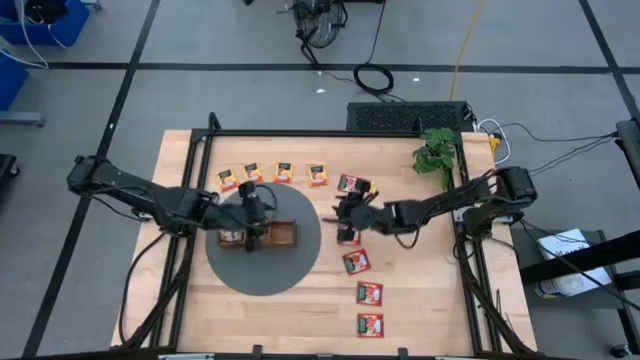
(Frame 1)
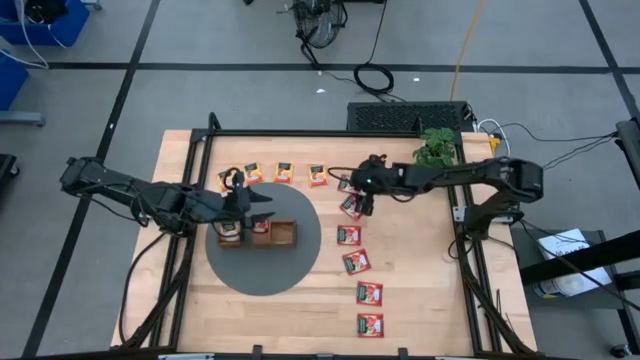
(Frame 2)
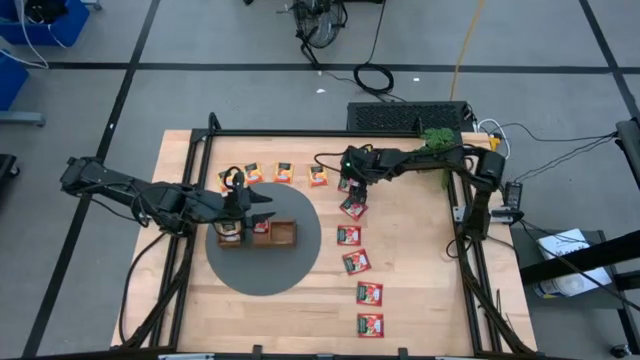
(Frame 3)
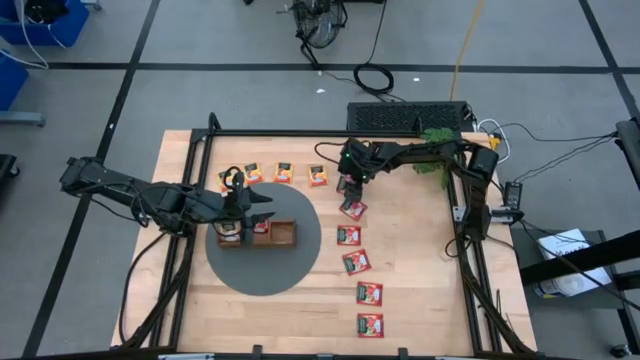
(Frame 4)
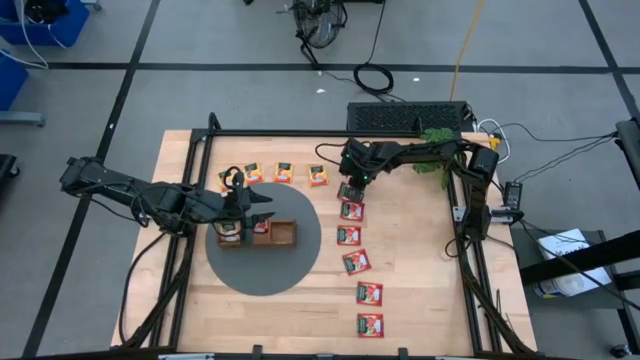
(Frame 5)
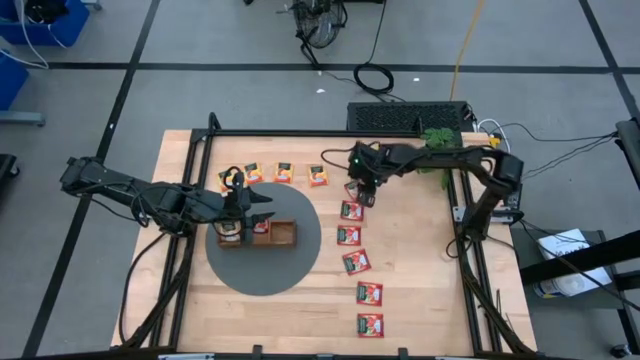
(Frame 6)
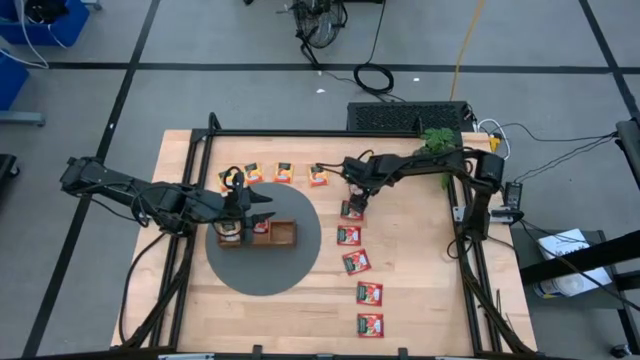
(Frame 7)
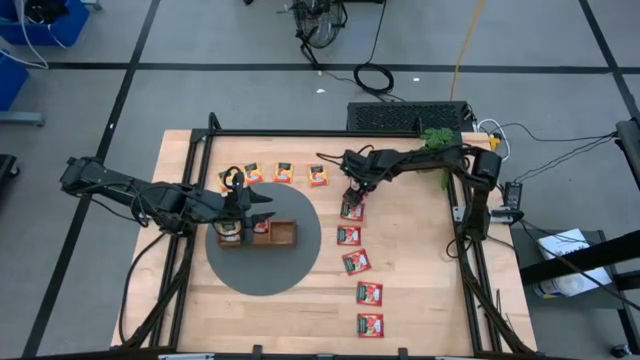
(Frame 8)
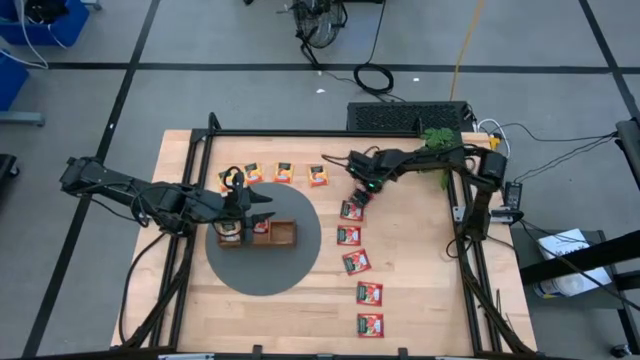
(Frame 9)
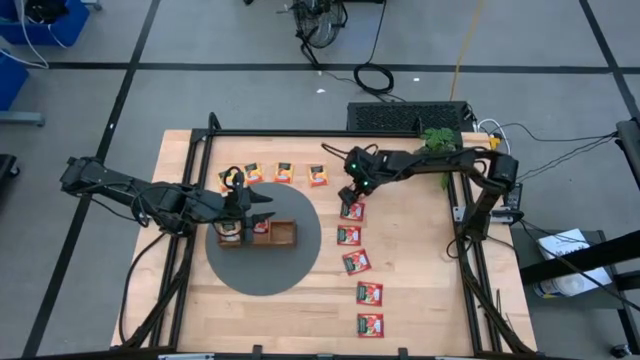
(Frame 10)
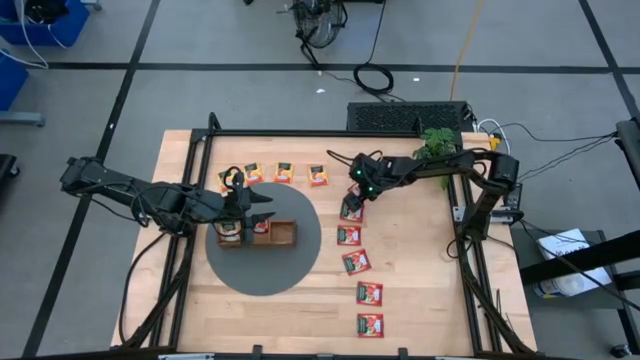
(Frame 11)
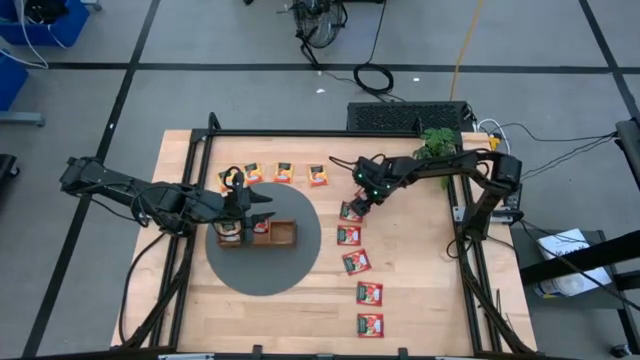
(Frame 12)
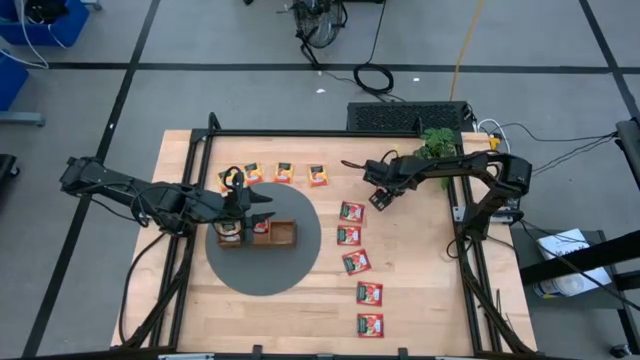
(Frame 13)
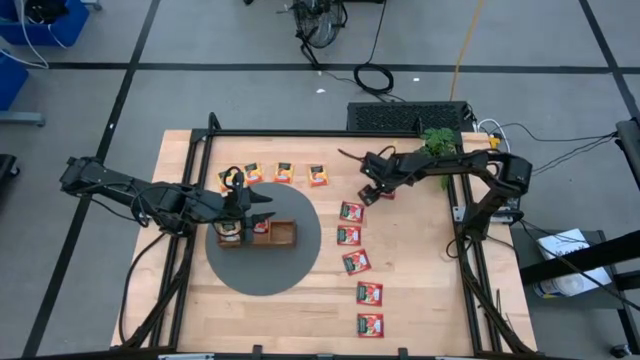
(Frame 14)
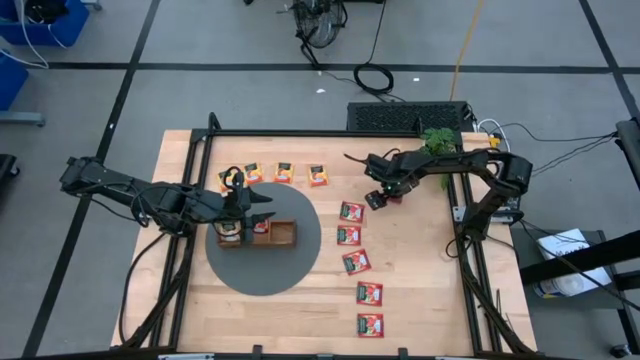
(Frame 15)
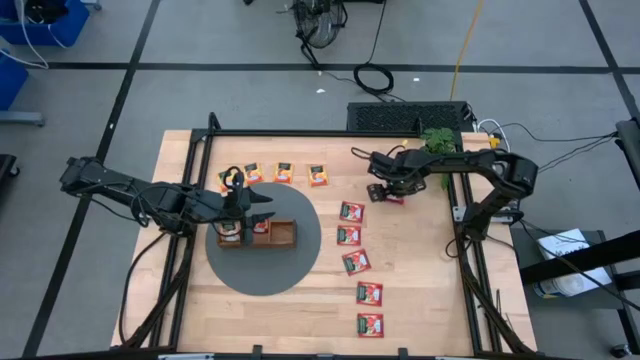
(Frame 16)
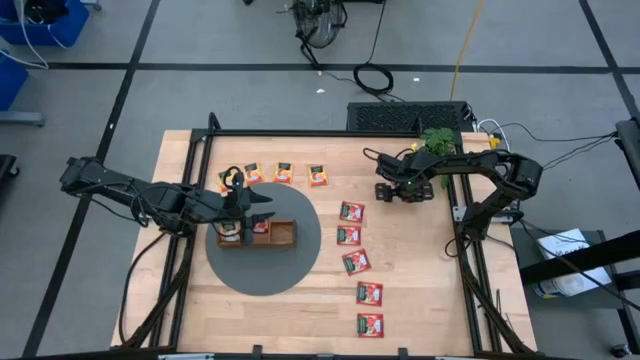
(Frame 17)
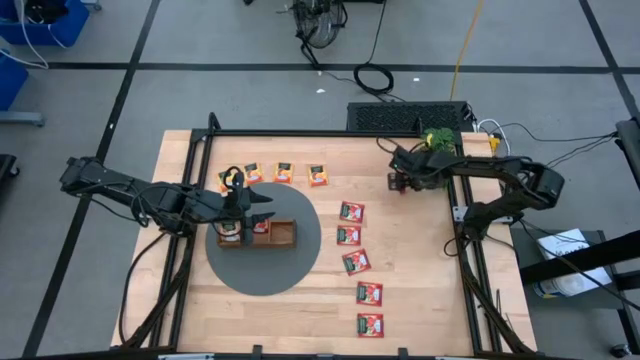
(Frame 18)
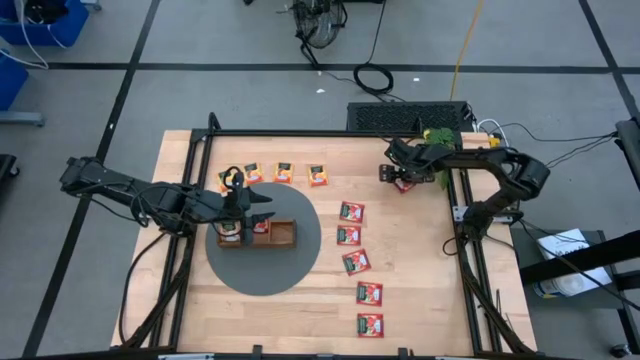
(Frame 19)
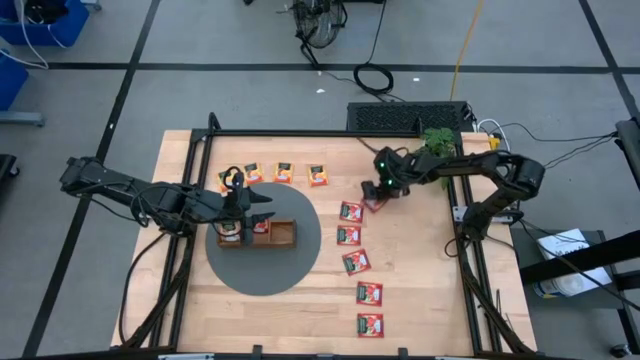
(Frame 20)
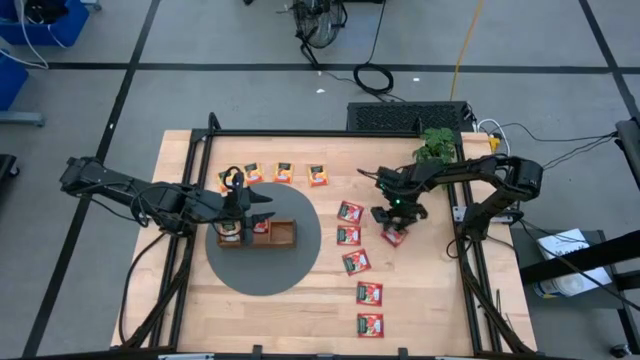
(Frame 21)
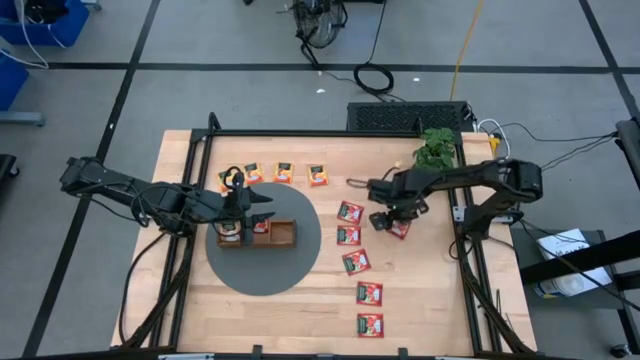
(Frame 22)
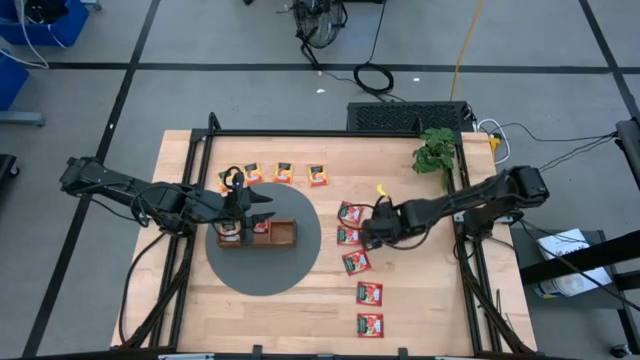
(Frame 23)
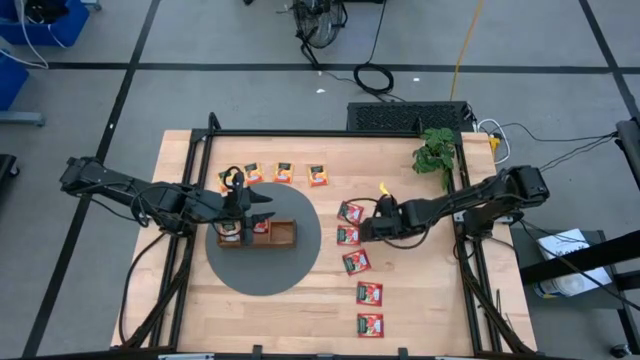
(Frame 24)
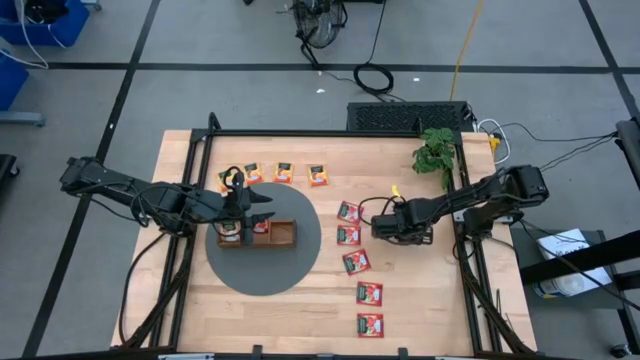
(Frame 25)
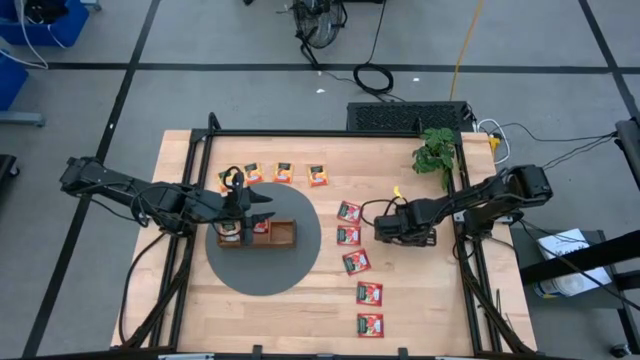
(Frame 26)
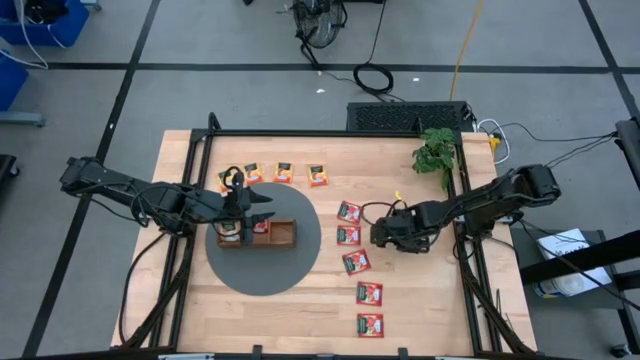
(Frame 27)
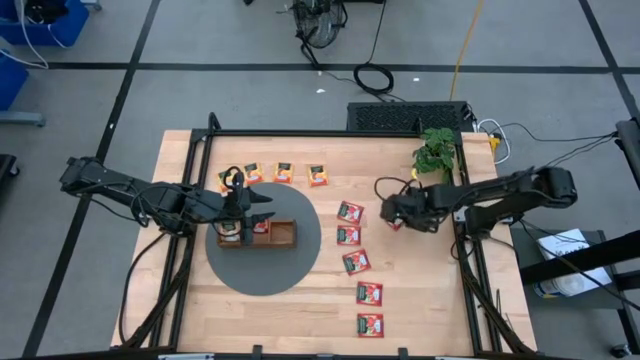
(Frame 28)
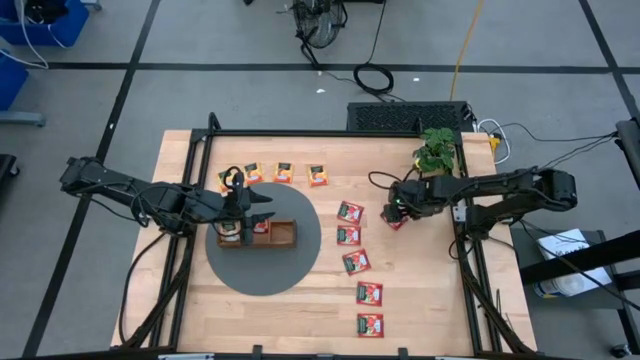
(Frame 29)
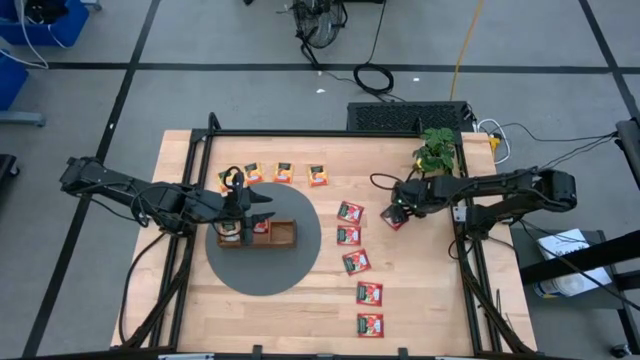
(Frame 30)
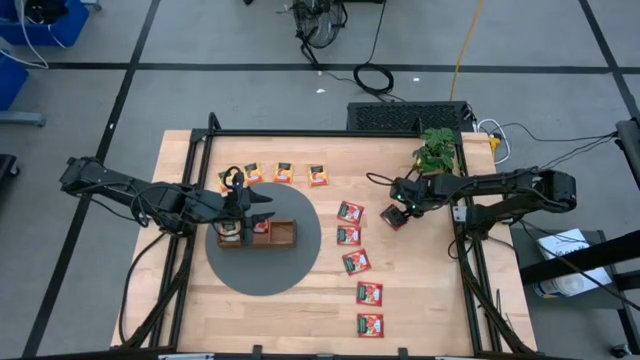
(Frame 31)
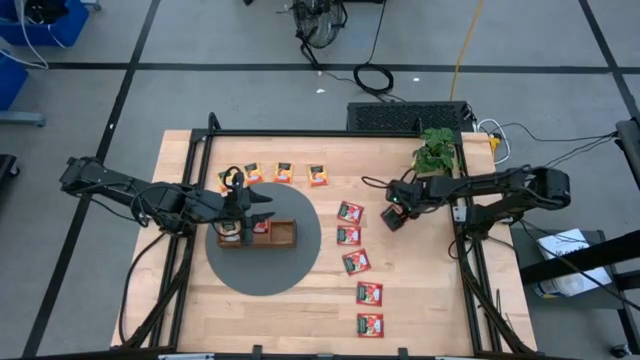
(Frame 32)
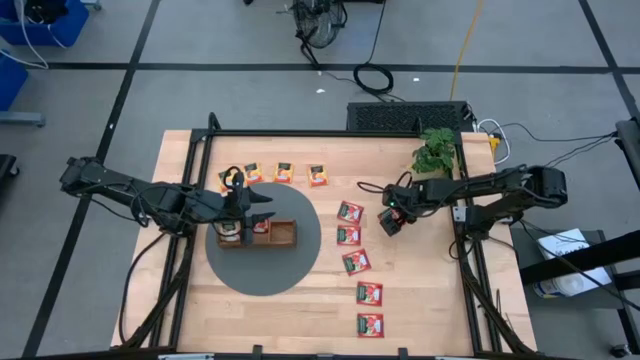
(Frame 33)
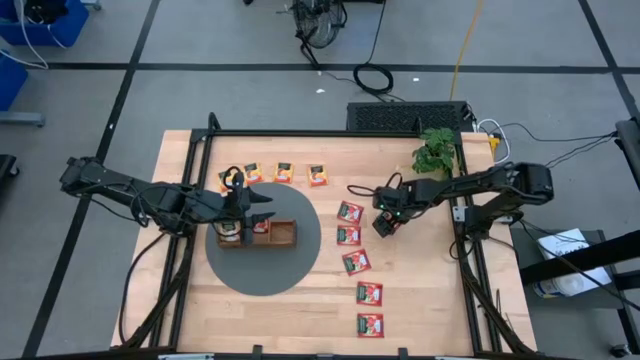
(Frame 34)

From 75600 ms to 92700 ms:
Task: Pick & Place Tea
Put the red tea bag into the middle section of the wooden organizer

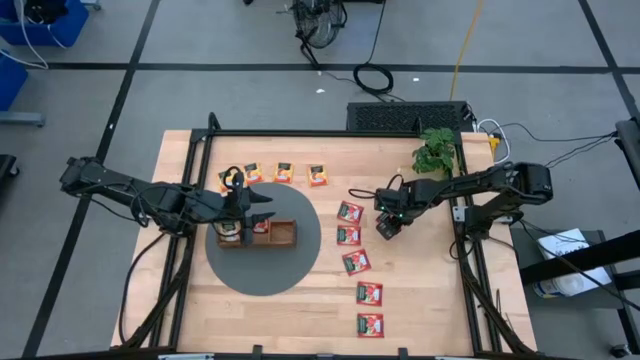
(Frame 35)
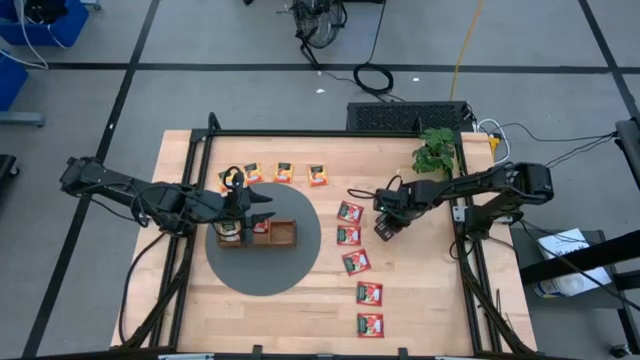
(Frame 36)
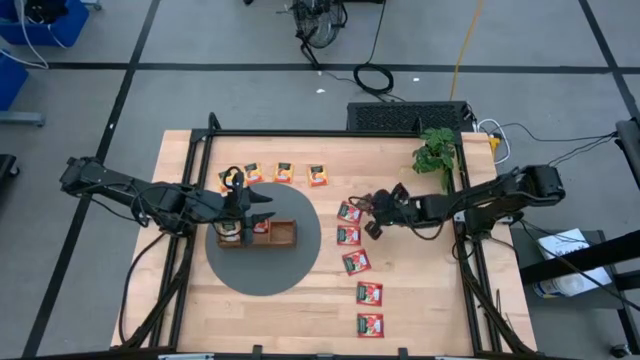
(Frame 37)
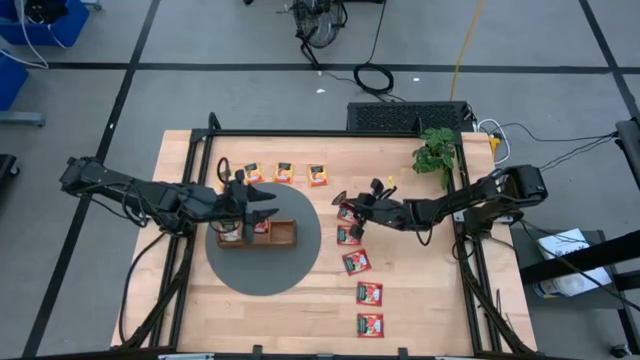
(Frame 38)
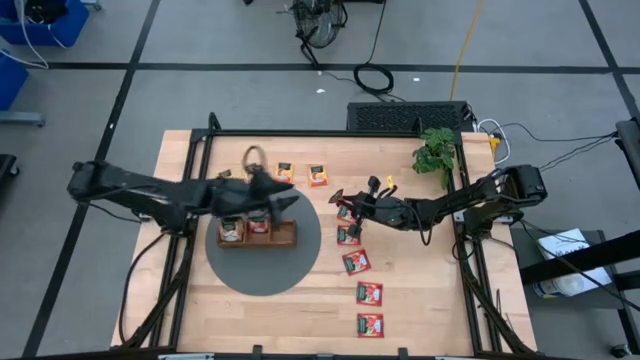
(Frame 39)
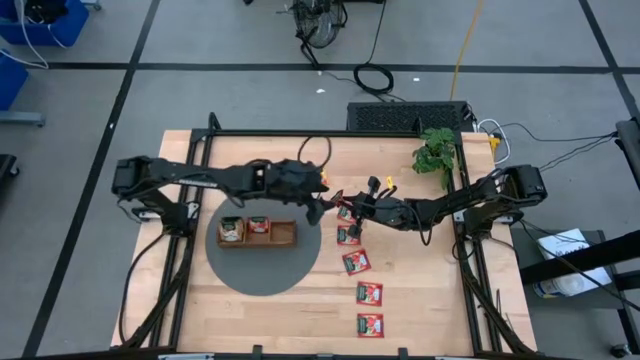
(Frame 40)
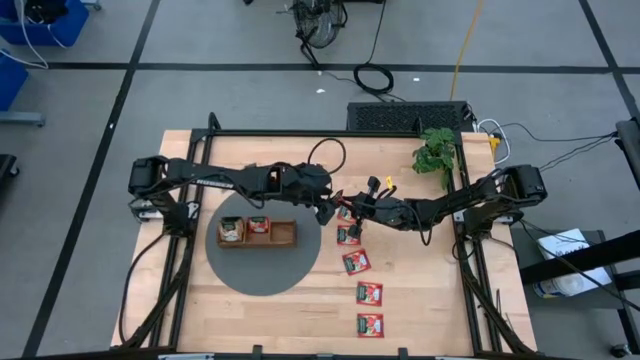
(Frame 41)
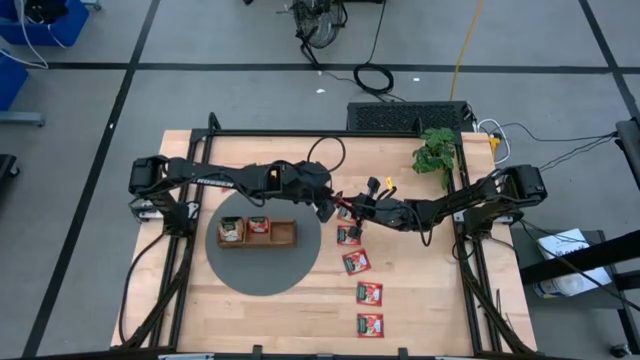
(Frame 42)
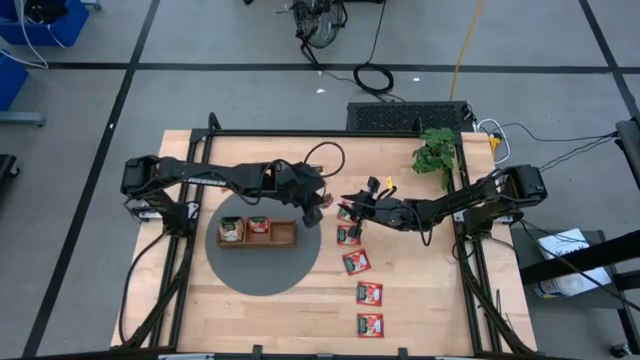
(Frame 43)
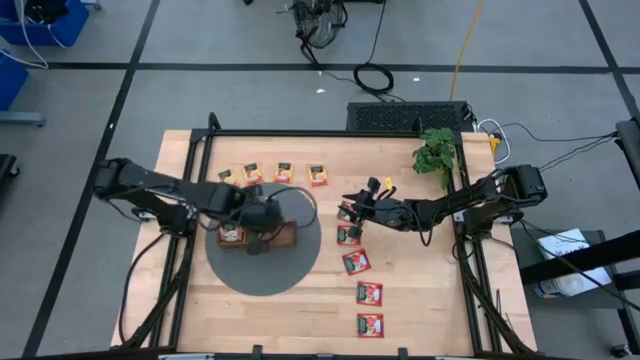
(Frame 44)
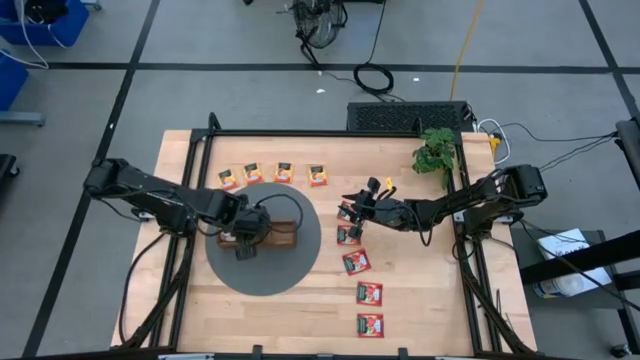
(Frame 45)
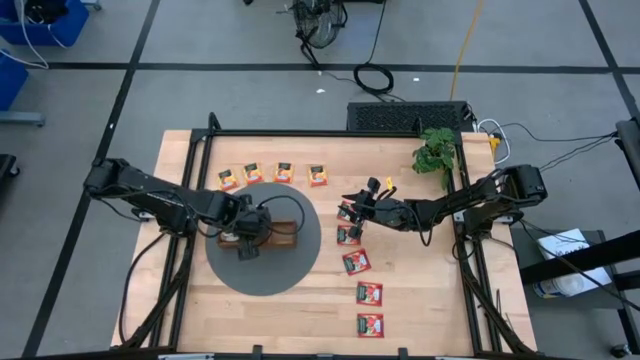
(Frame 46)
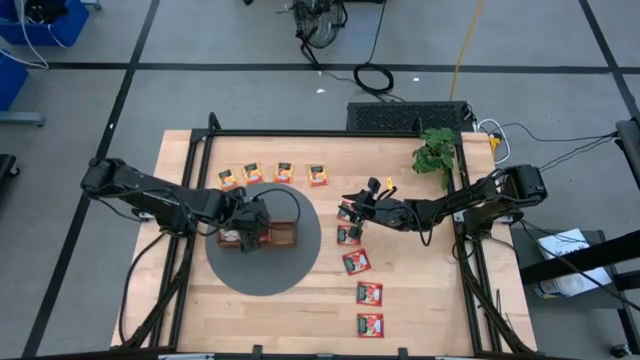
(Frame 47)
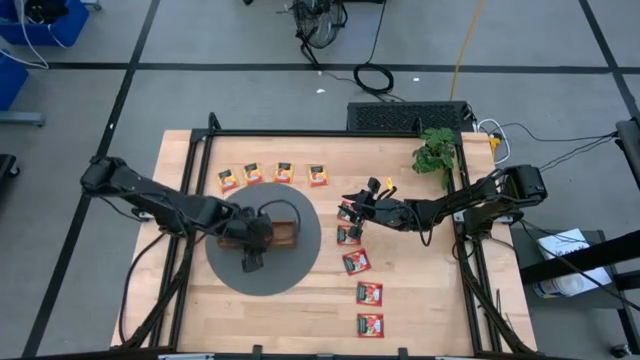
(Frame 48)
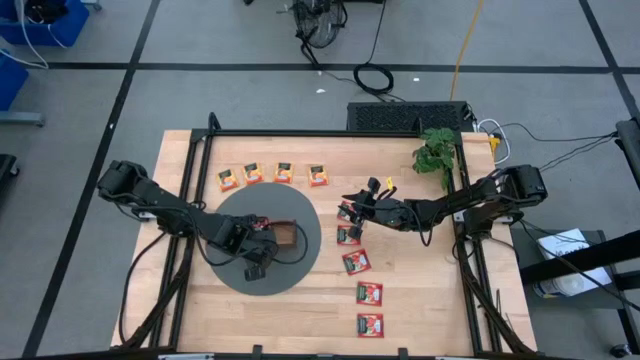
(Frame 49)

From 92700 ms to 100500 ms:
Put the red tea bag into the middle section of the wooden organizer
